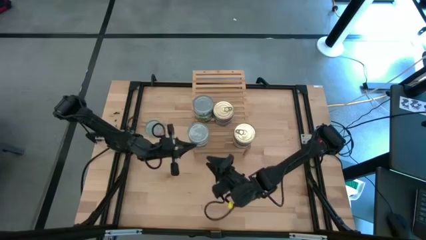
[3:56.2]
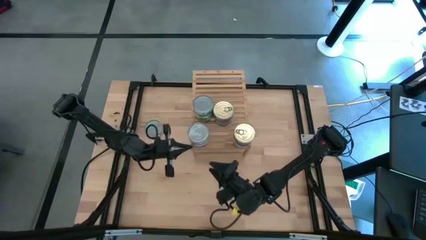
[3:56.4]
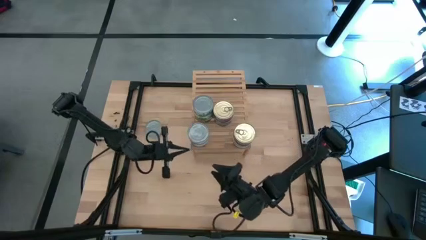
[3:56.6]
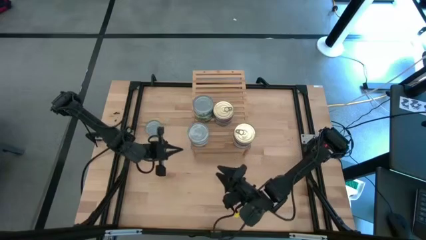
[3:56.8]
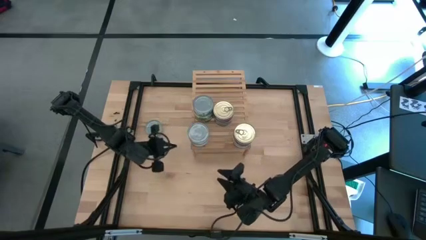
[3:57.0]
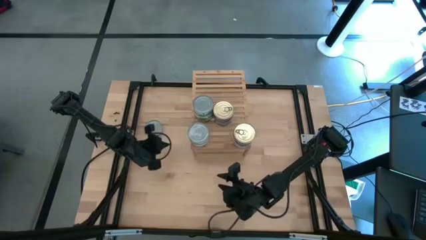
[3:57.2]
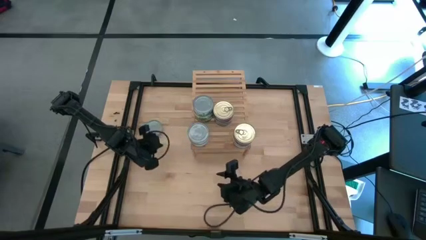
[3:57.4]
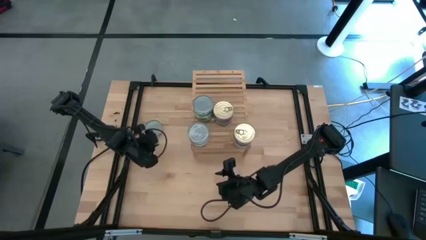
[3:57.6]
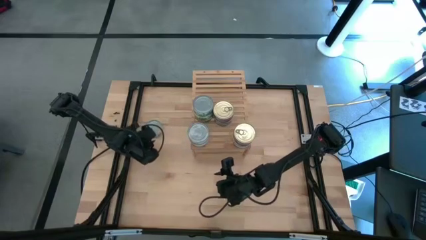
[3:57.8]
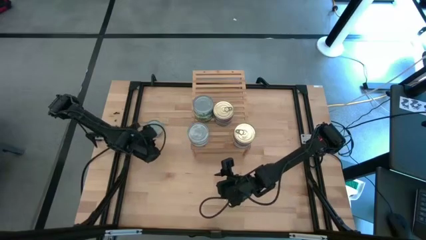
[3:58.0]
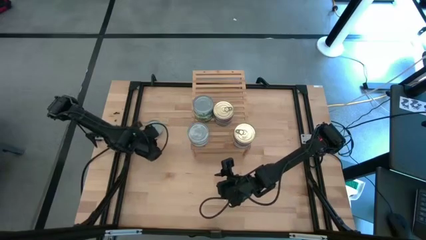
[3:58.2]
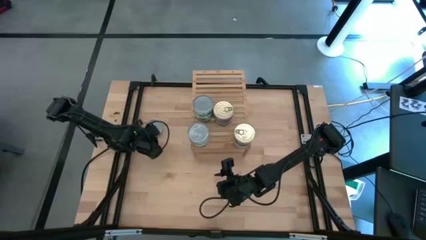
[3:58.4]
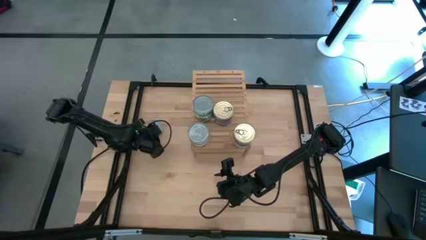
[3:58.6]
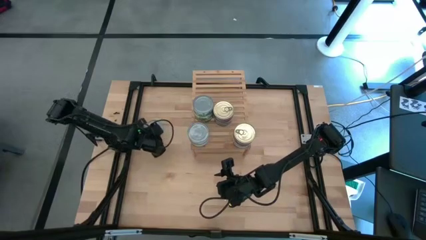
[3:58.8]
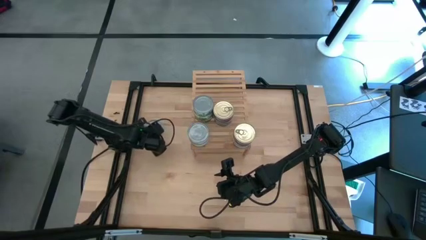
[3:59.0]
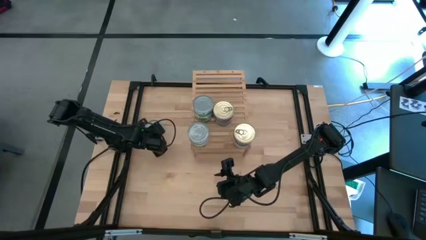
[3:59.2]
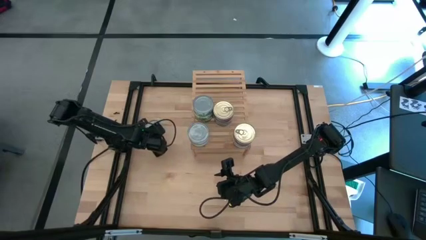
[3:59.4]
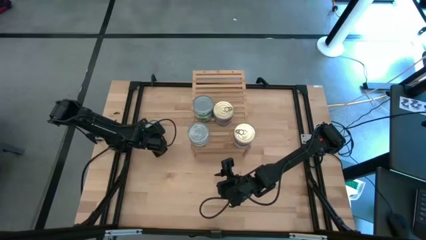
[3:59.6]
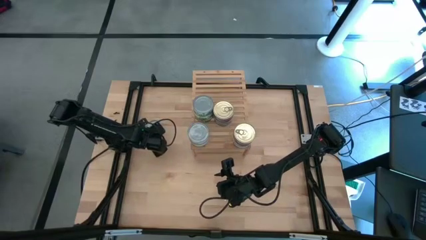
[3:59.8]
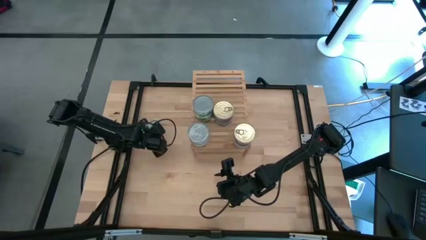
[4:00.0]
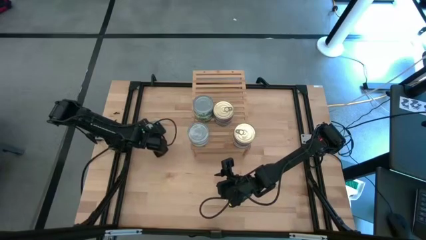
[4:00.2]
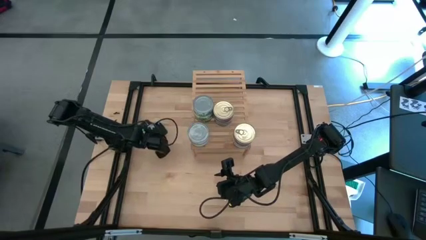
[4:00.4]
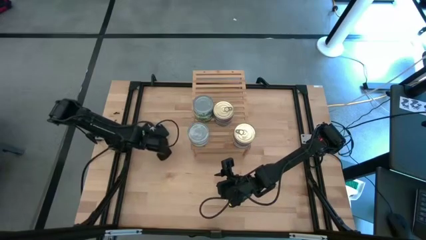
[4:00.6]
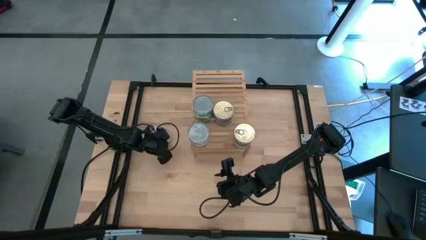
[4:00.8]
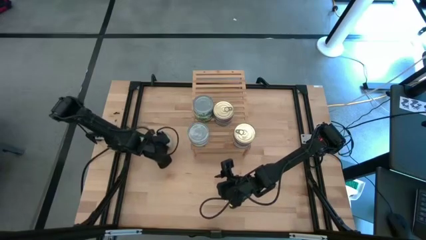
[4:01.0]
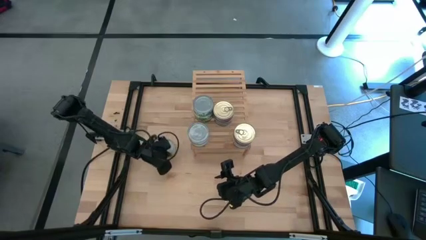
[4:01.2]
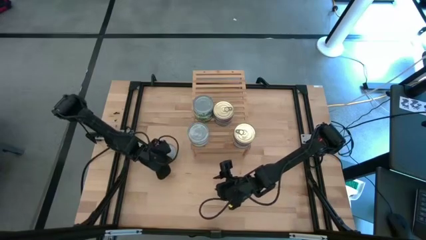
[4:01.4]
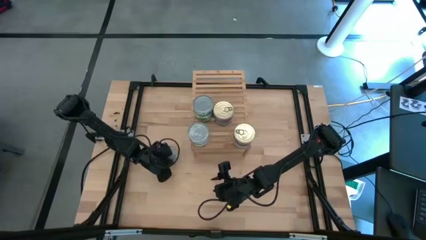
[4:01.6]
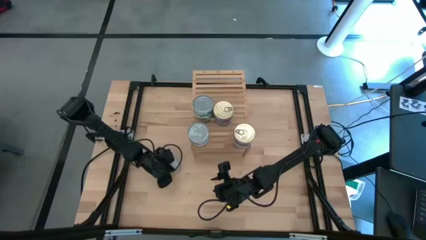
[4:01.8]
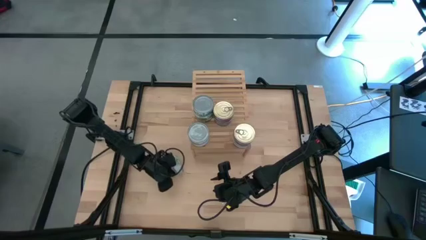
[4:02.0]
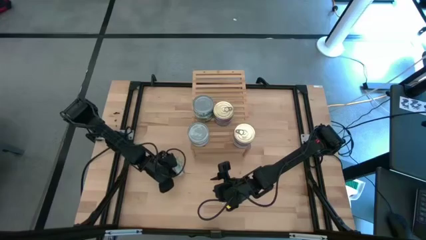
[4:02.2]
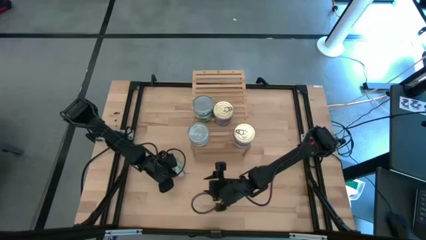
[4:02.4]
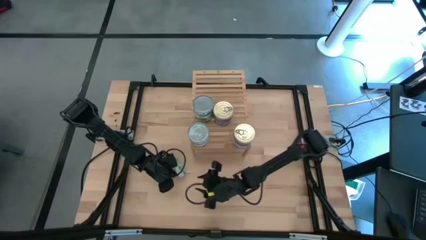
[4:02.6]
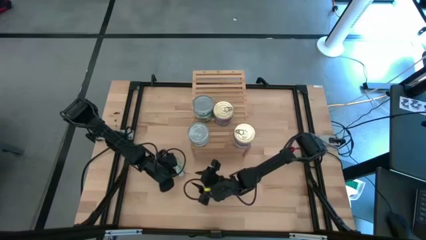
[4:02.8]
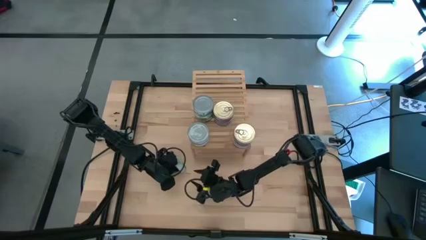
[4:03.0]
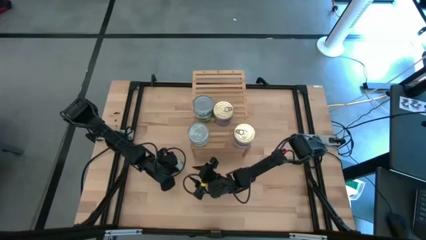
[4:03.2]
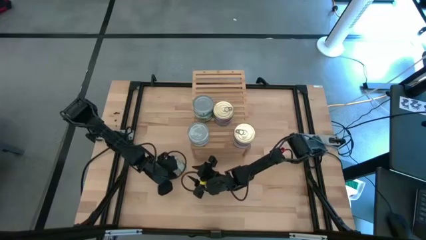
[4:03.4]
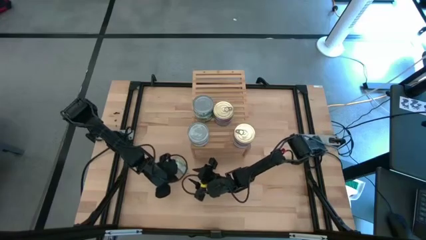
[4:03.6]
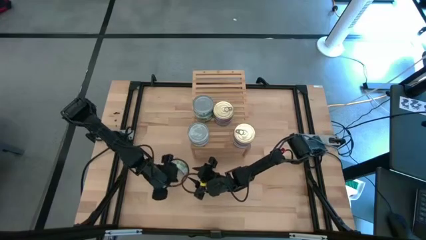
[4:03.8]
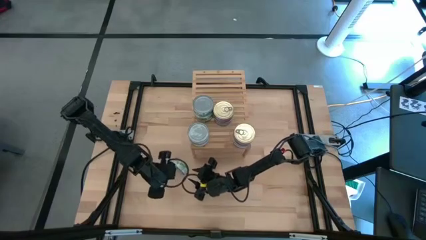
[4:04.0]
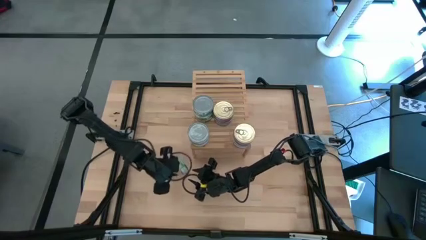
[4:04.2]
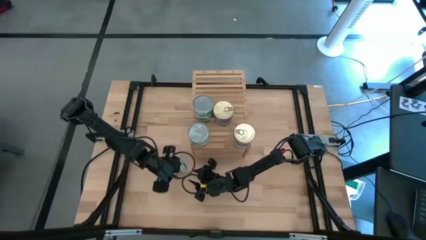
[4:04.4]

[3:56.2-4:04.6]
Task: Stack canned seafood by type on shelf
Stack the green tuna can on top of the green tuna can on the shelf

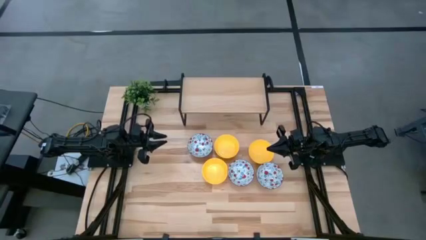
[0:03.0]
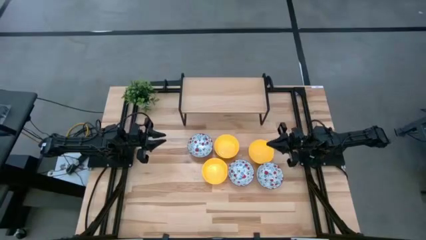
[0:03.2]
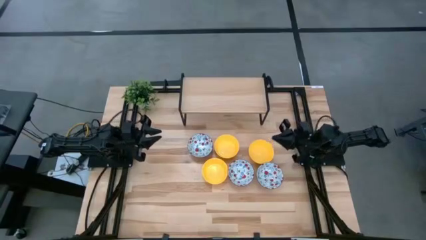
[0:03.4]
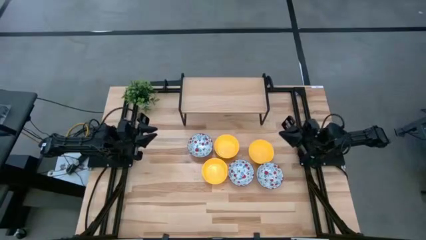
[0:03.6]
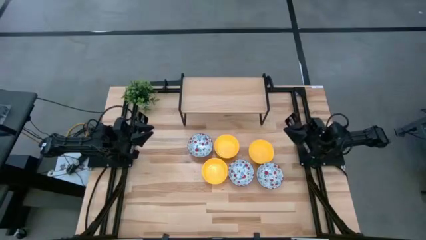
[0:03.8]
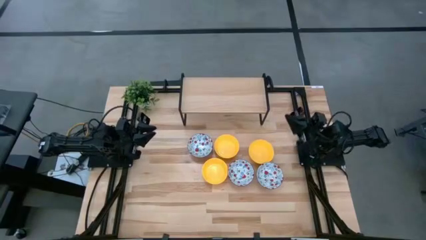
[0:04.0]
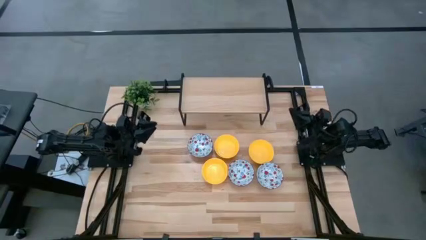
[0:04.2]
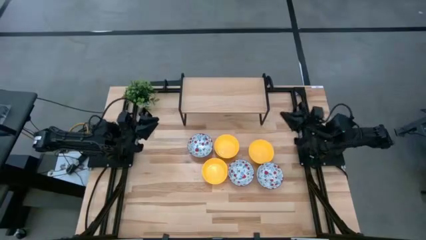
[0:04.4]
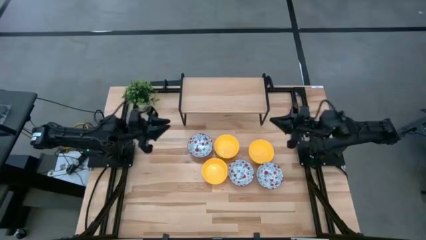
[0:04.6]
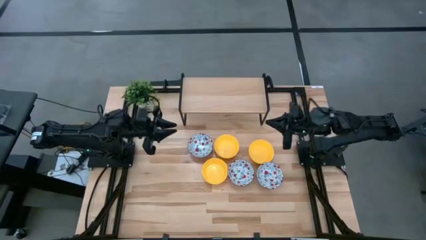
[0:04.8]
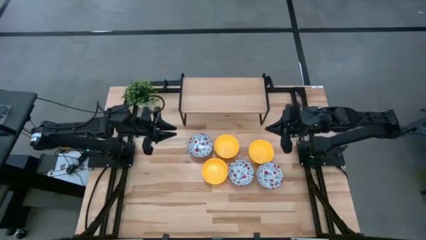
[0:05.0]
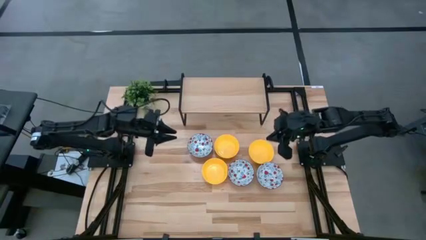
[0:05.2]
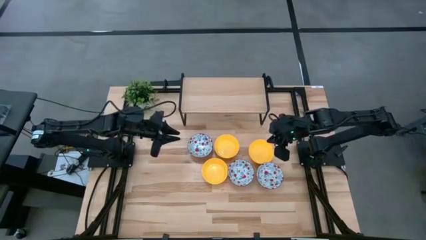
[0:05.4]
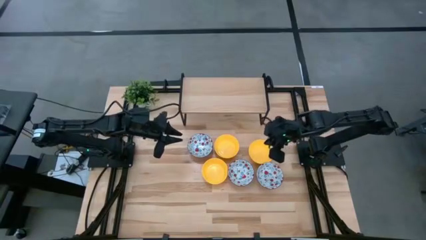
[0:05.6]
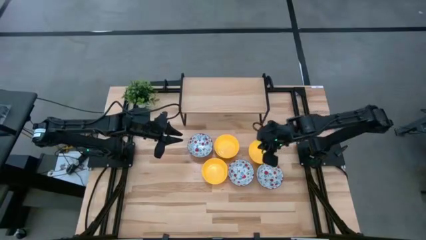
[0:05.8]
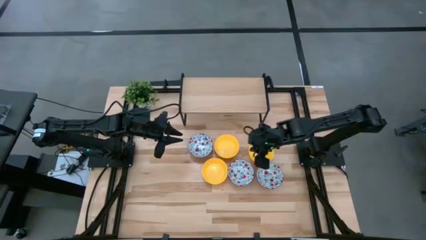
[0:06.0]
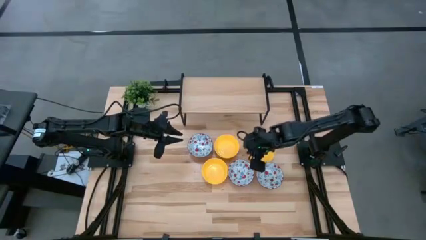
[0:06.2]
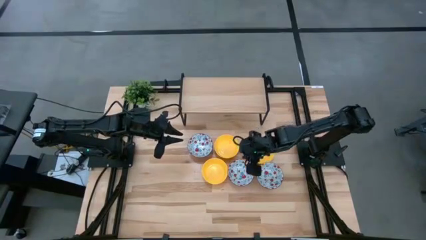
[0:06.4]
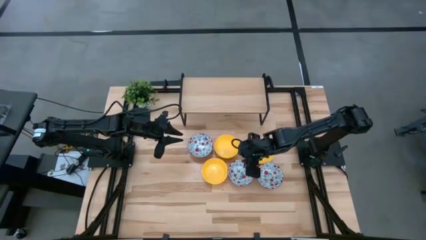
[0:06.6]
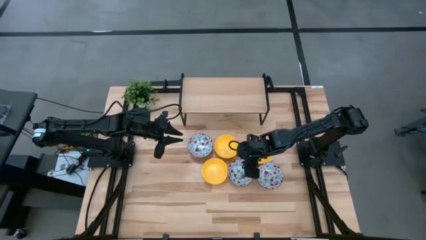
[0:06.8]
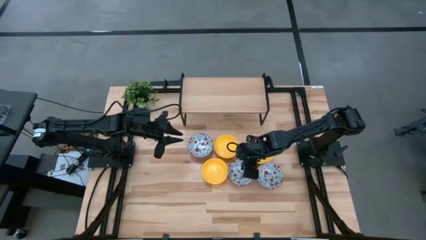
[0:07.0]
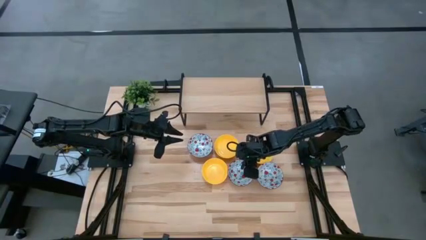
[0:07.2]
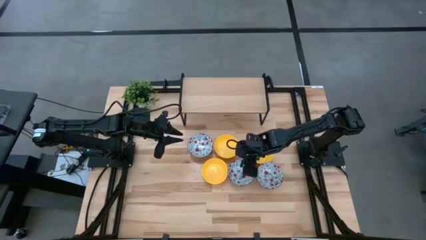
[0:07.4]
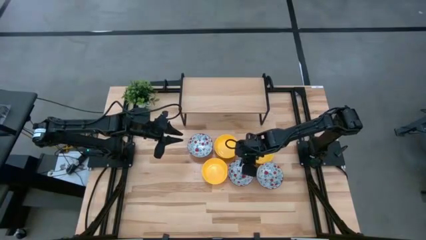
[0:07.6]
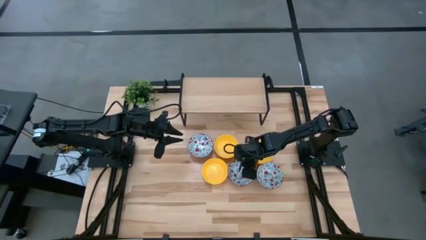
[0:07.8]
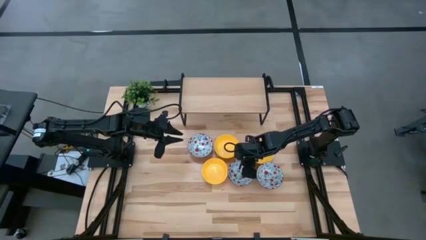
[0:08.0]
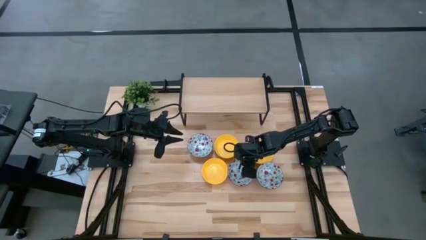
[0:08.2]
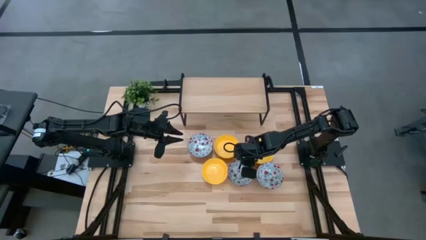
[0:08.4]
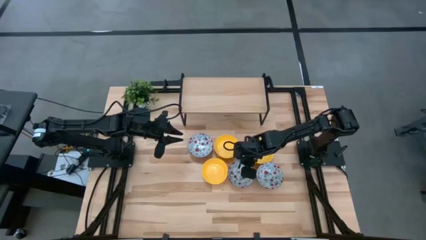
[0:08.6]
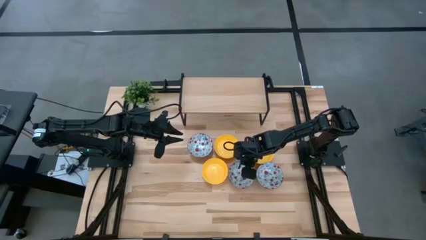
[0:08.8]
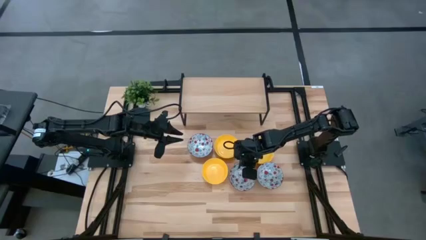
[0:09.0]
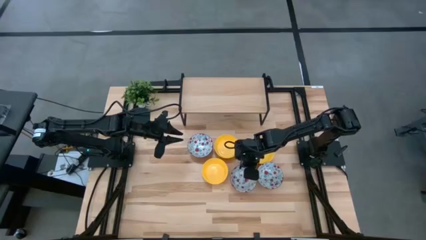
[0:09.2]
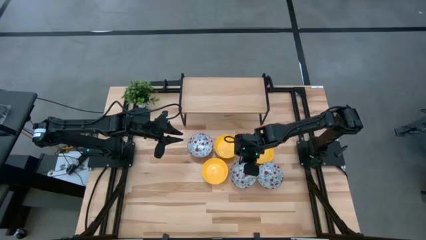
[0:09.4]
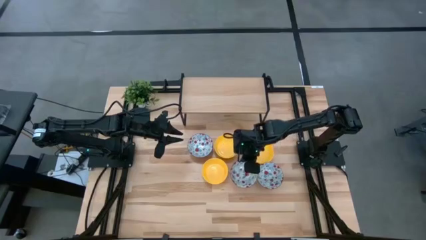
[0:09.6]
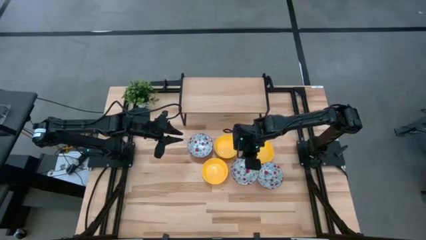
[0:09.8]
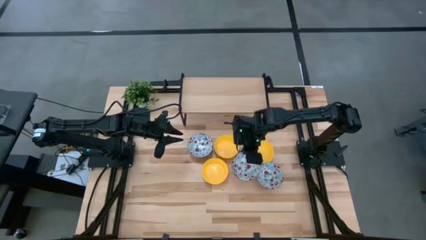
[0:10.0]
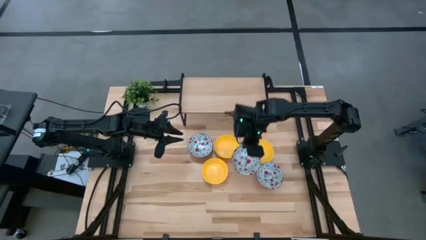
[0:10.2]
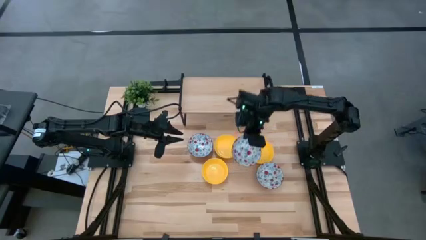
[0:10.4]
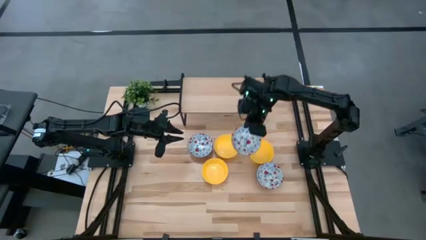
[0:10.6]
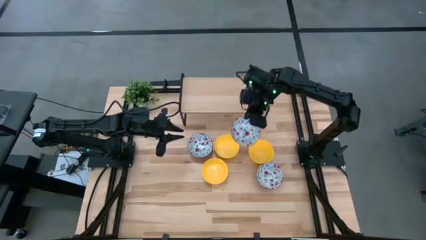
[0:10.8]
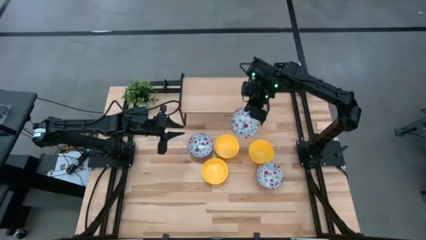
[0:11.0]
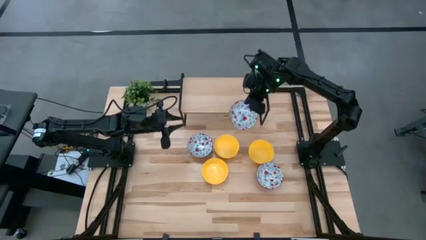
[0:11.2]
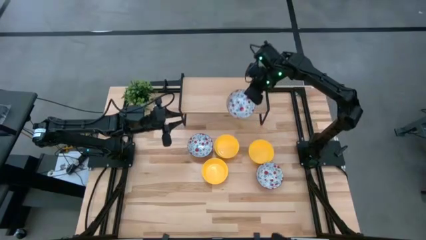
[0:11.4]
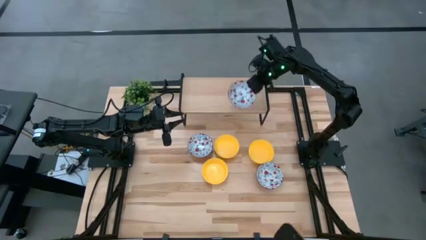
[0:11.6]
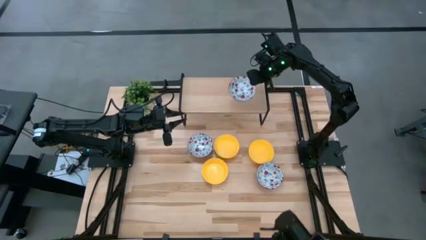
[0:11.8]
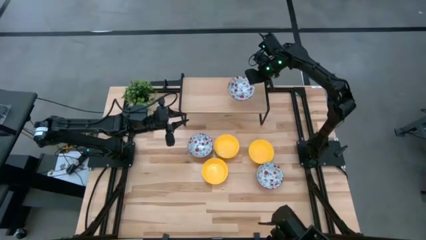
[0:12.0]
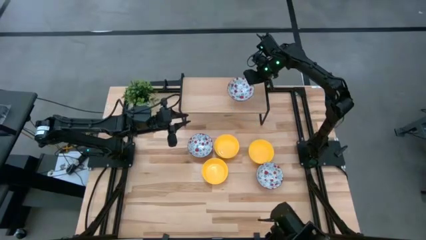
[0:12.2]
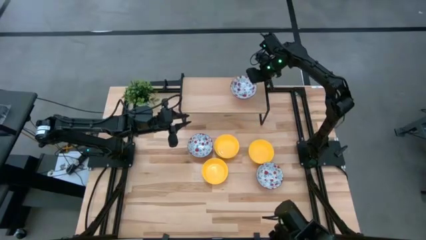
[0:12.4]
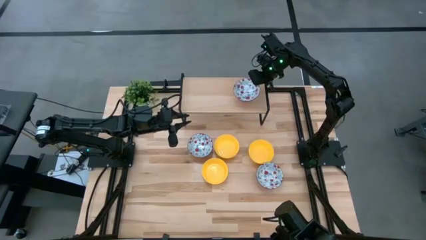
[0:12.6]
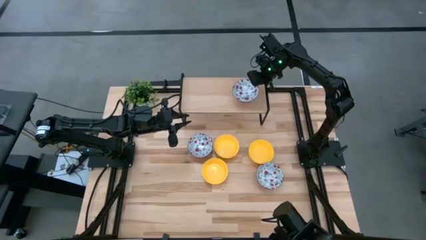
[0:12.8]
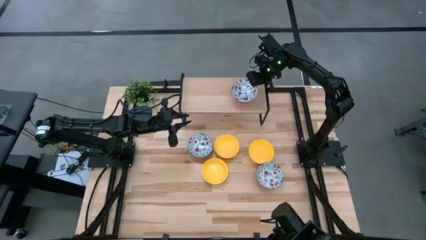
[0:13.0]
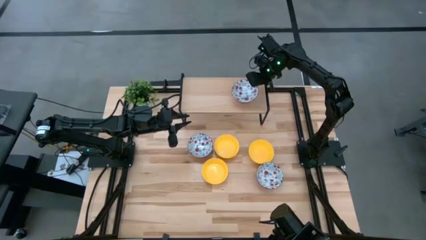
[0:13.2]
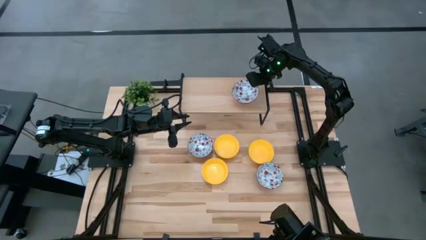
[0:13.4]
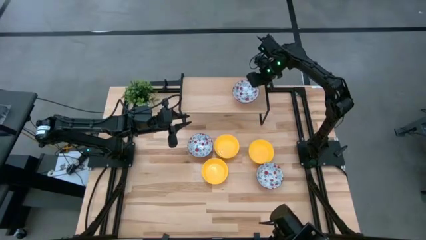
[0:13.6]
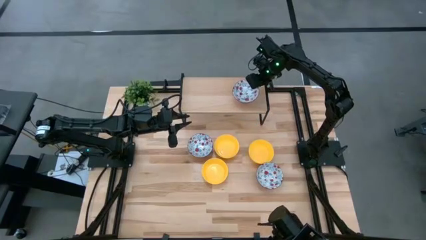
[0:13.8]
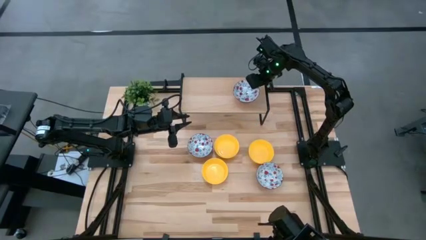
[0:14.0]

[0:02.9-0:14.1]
Task: Pick & Place Mini bowls
Put the middle white patterned bowl on the shelf
